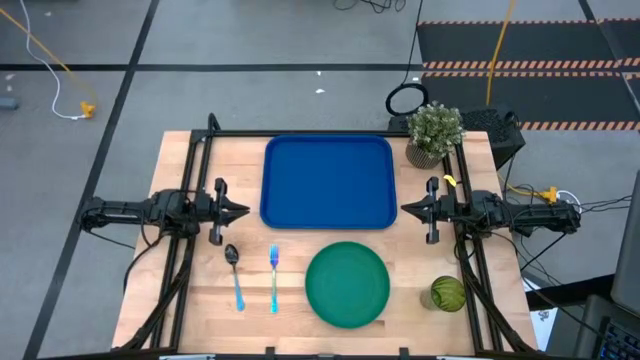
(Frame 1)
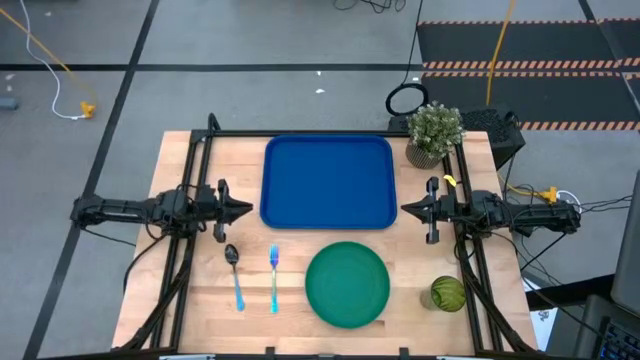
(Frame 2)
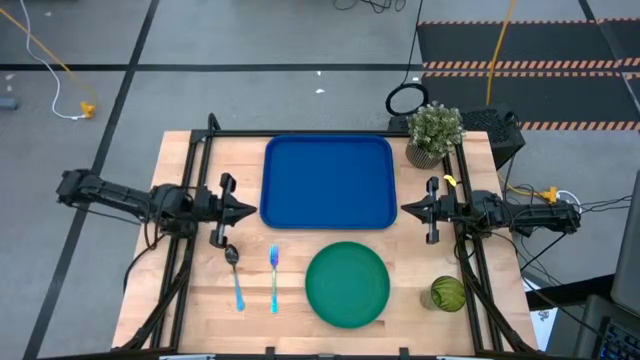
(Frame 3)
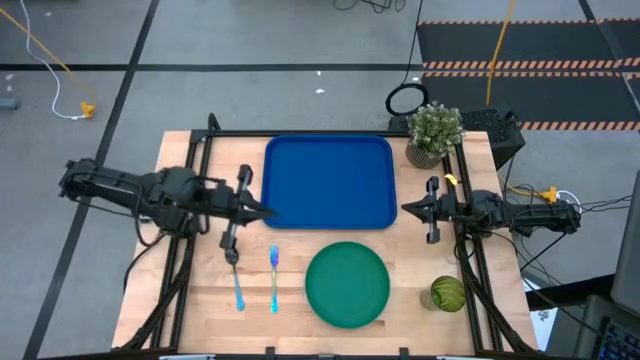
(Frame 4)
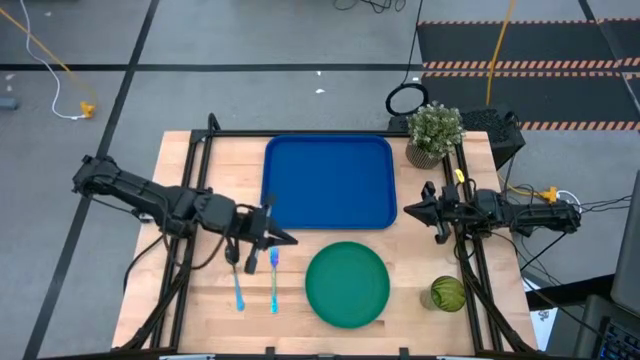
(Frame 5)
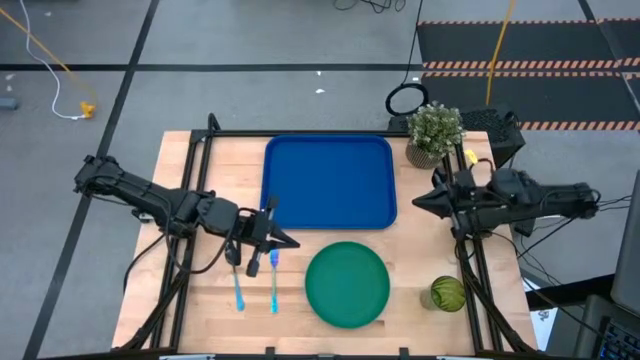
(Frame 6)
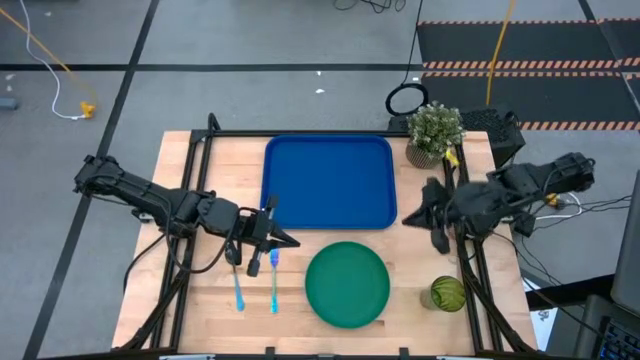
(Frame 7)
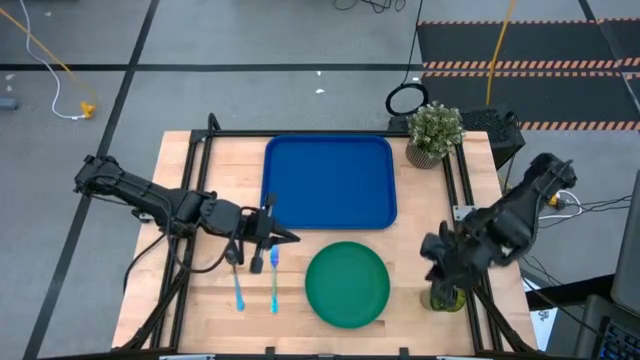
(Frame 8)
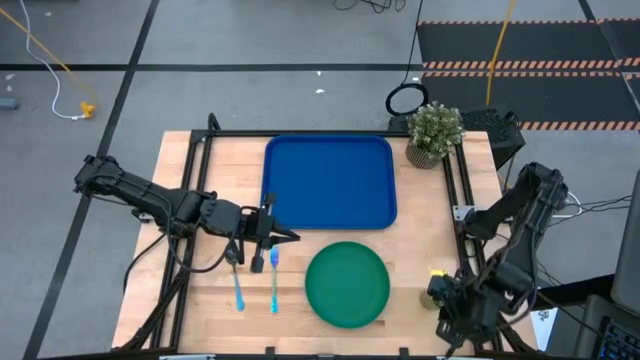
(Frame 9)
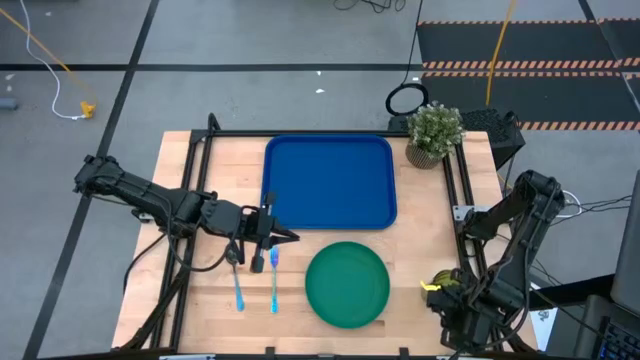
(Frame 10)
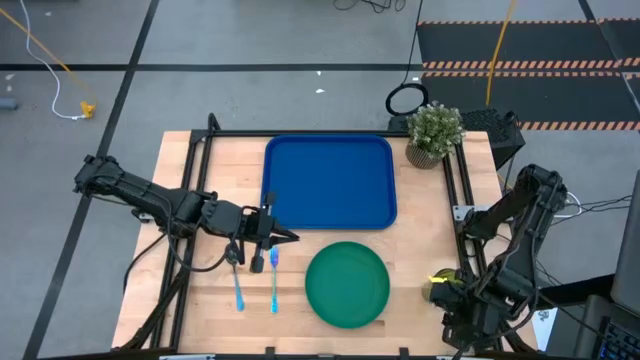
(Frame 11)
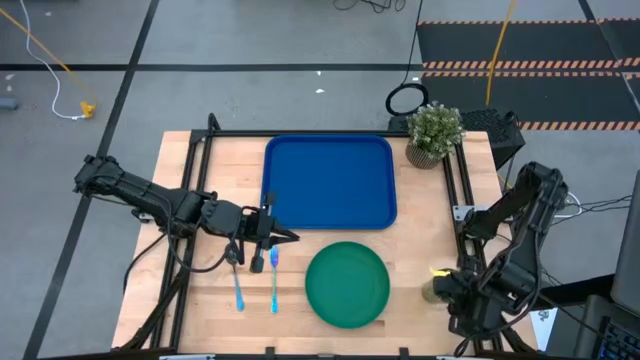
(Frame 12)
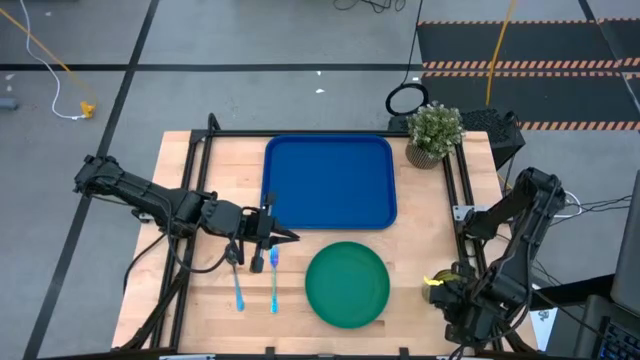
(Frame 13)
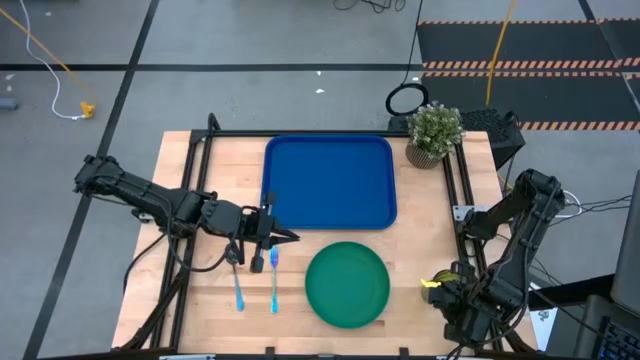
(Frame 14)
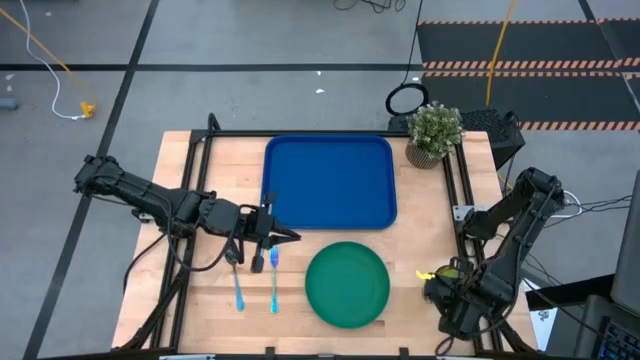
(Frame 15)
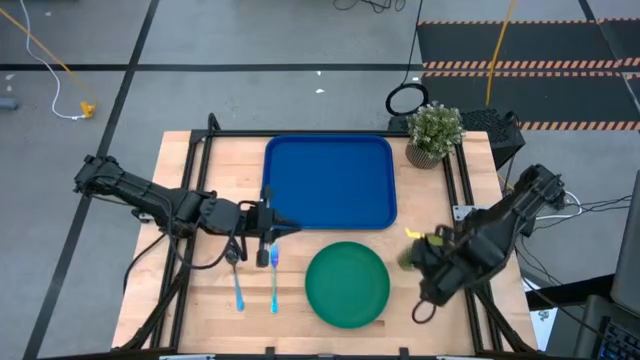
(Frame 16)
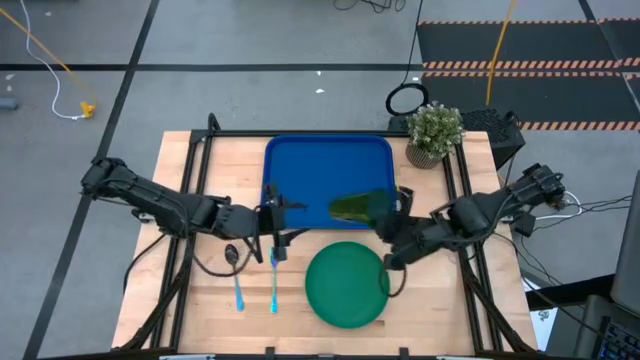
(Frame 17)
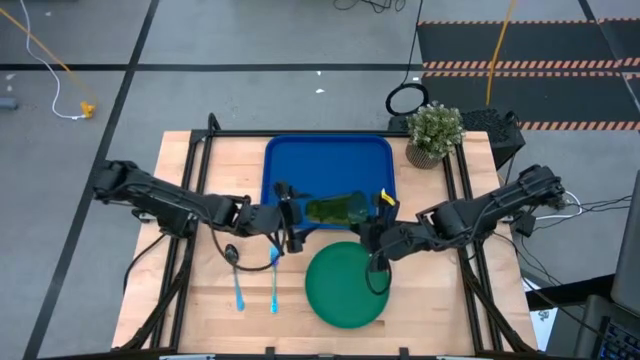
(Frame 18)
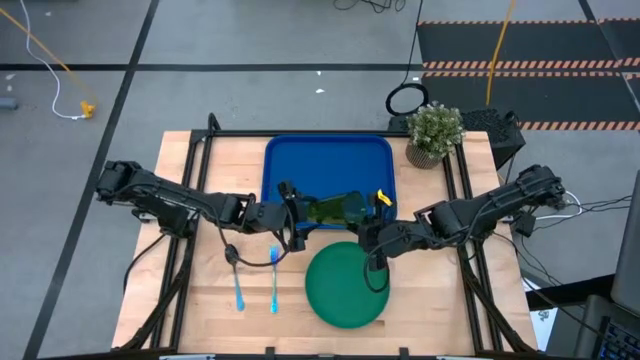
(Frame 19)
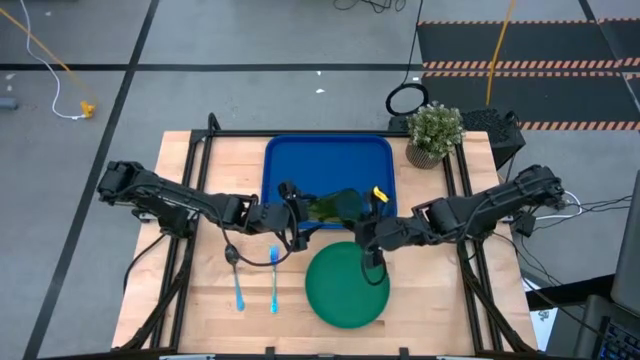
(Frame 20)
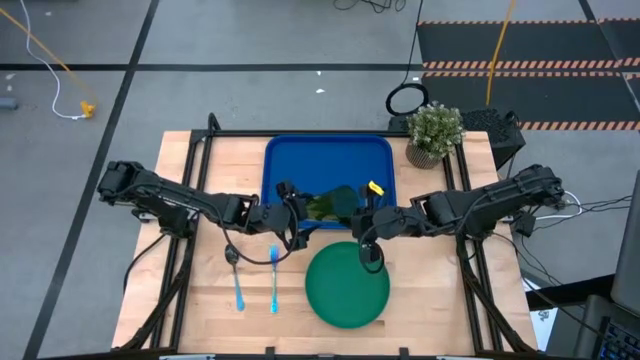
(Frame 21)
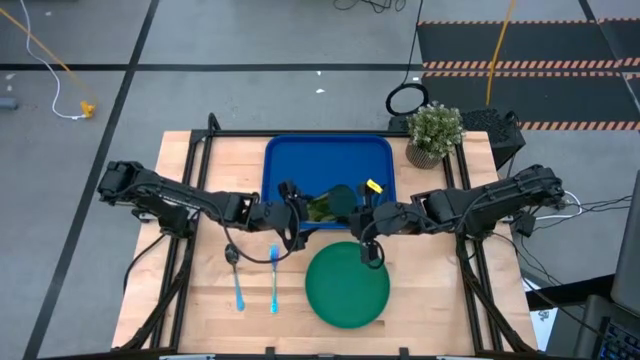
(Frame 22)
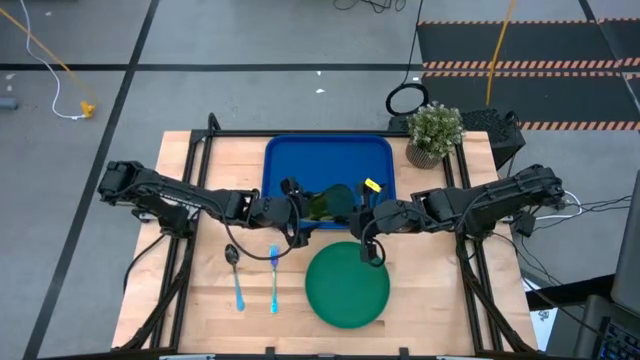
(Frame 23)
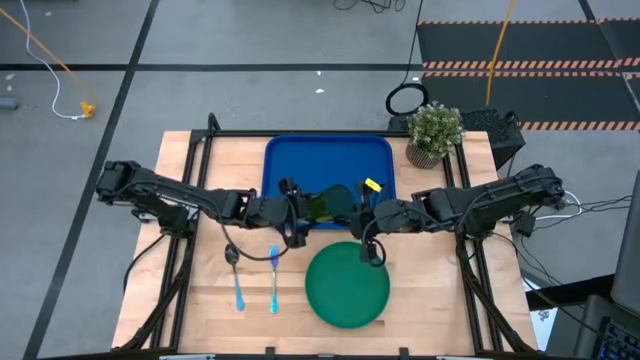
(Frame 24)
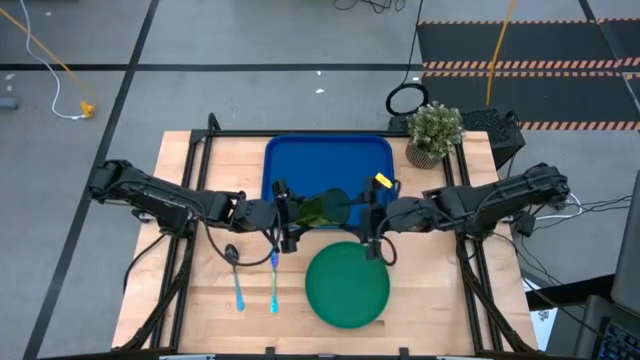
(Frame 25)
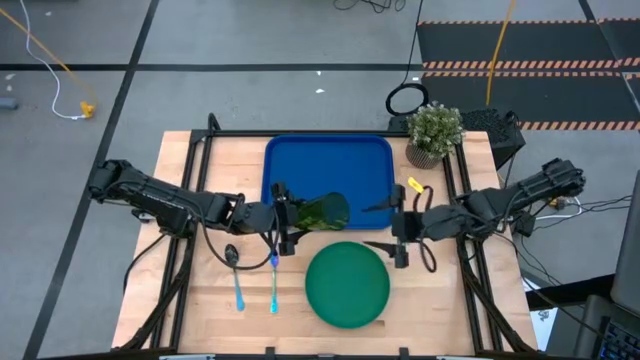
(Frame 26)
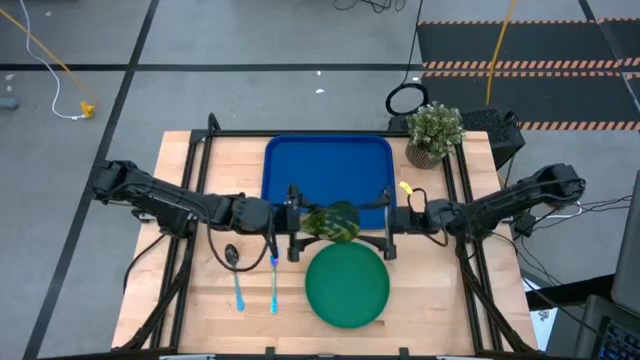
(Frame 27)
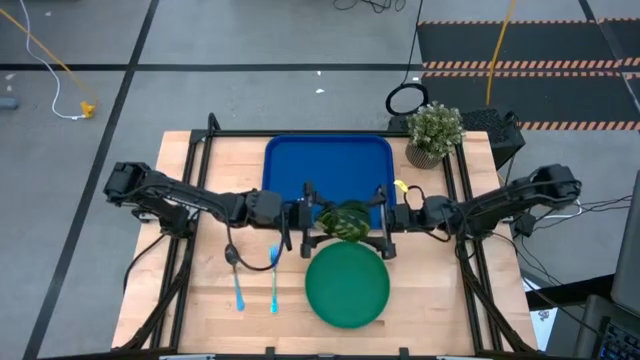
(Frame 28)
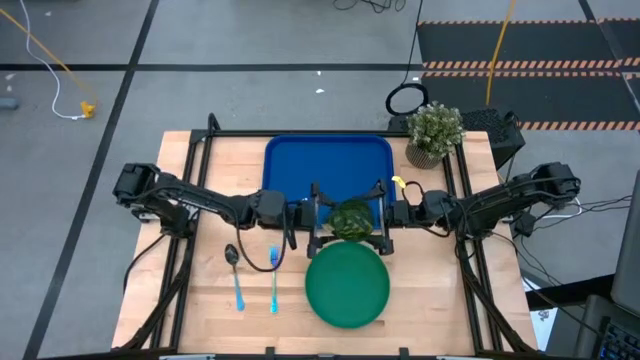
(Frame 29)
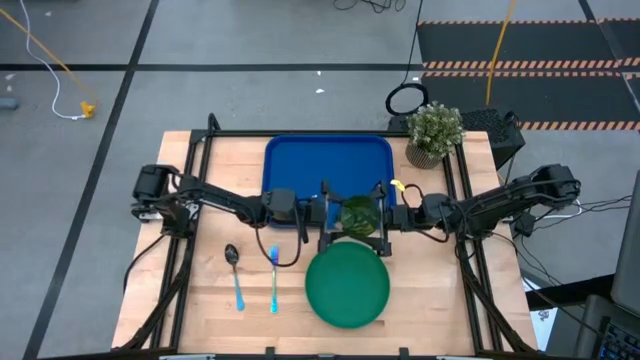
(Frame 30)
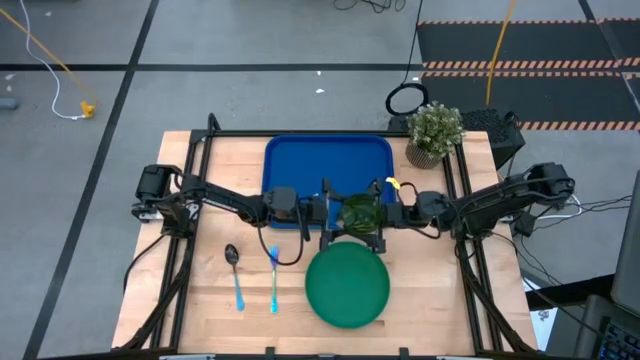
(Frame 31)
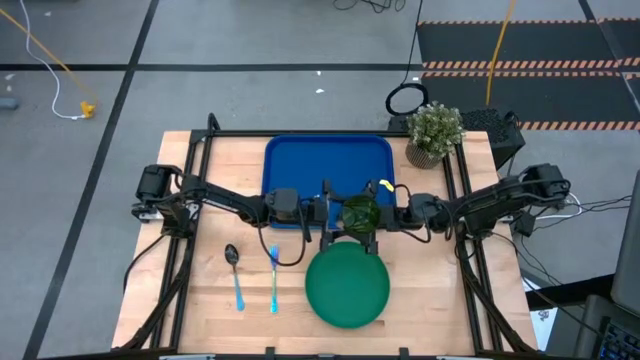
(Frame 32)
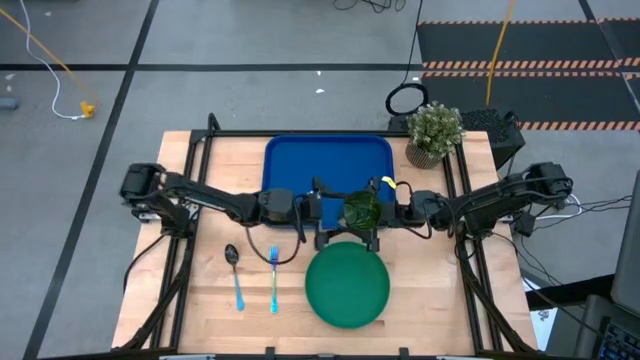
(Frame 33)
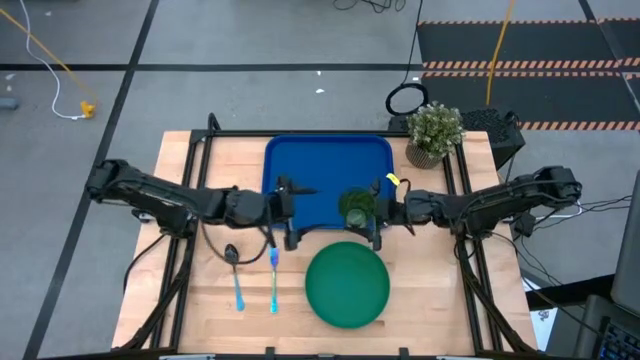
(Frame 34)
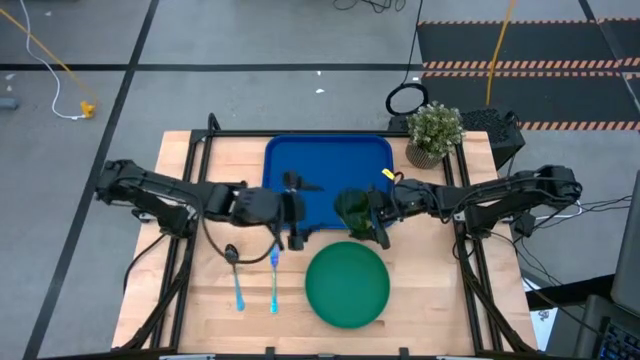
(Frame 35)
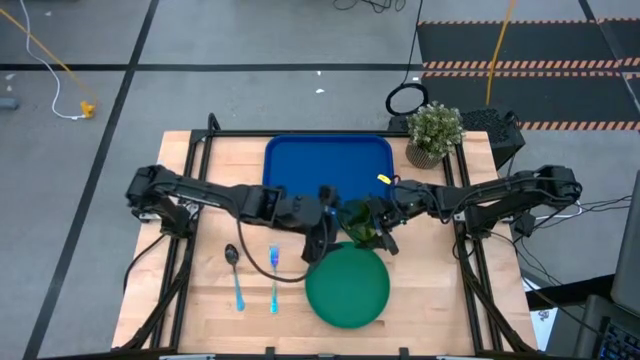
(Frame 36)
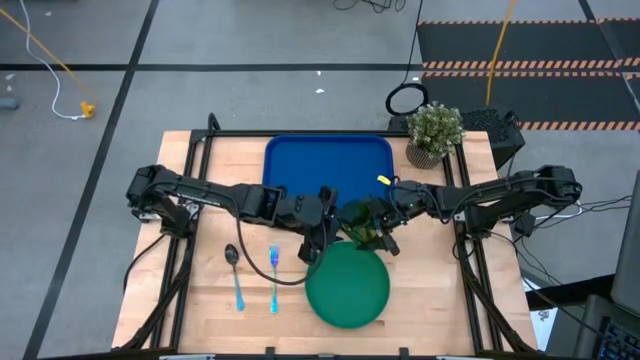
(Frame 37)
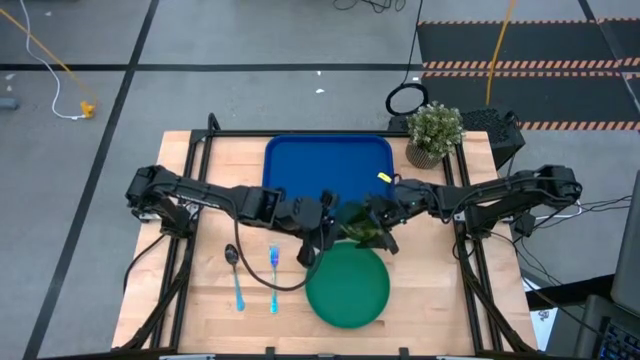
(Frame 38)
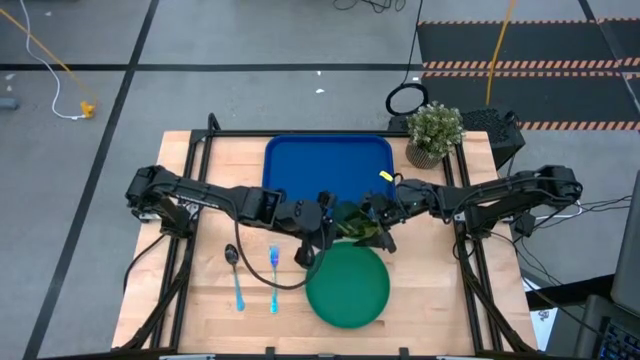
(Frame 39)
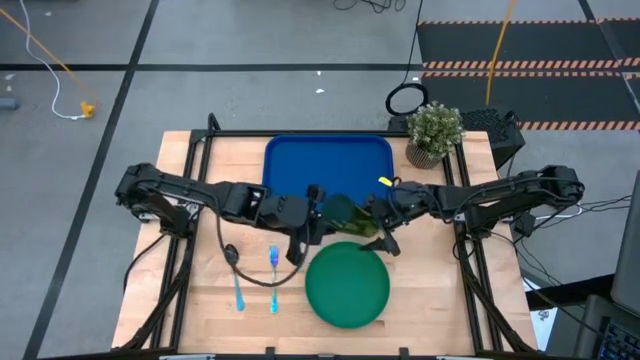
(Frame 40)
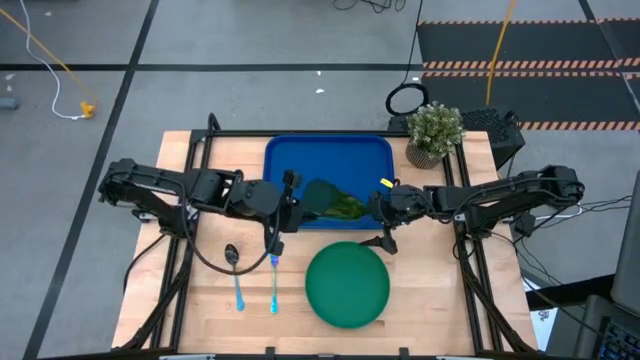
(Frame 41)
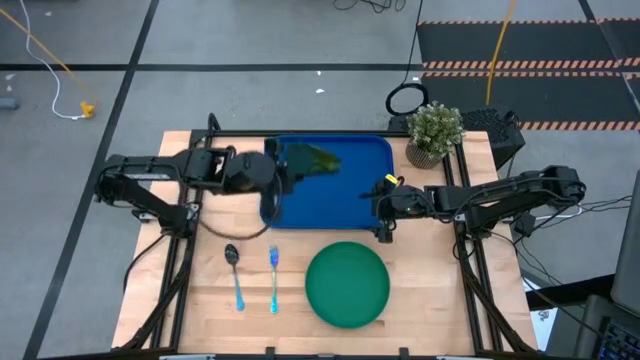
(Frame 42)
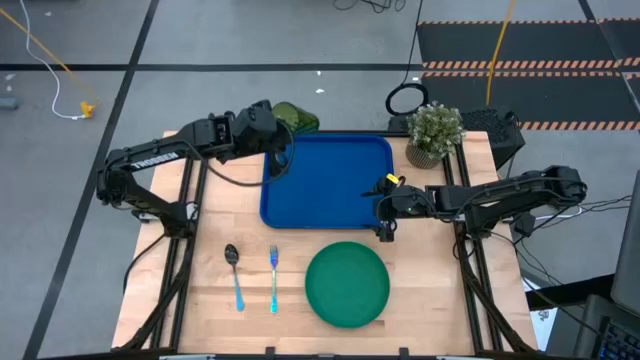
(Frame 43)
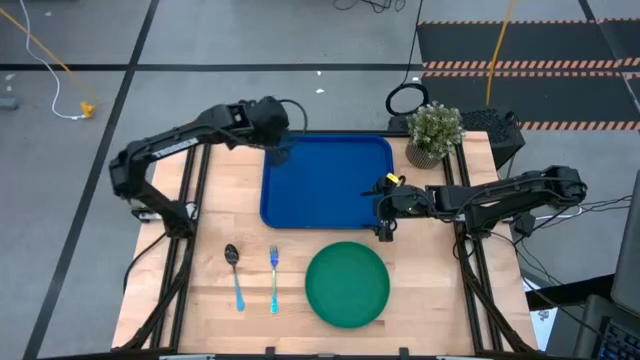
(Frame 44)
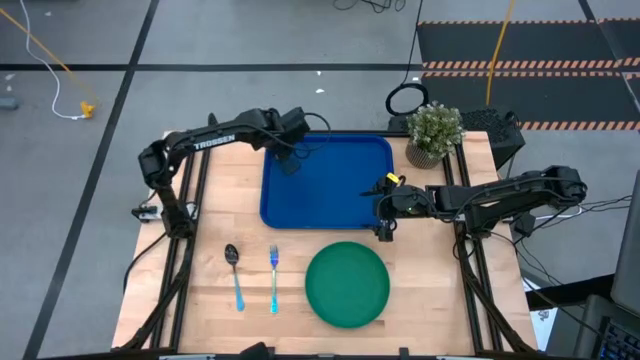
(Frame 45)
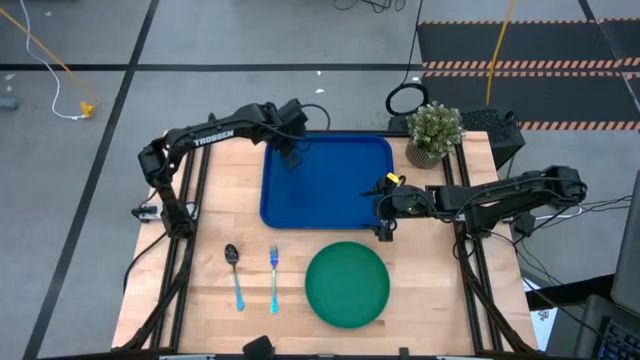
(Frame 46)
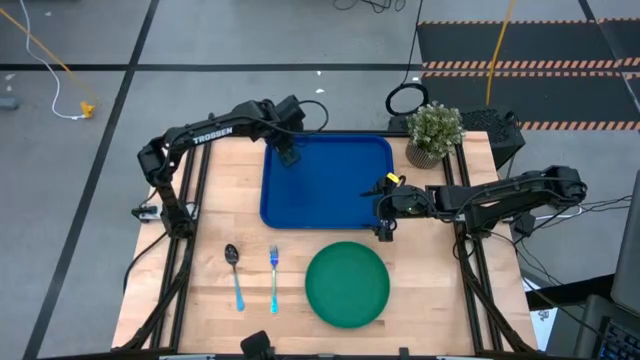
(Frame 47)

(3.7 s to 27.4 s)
Task: Pick and place plate/cup/fork/spoon on tray
Put the green glass on the top left of the blue tray
